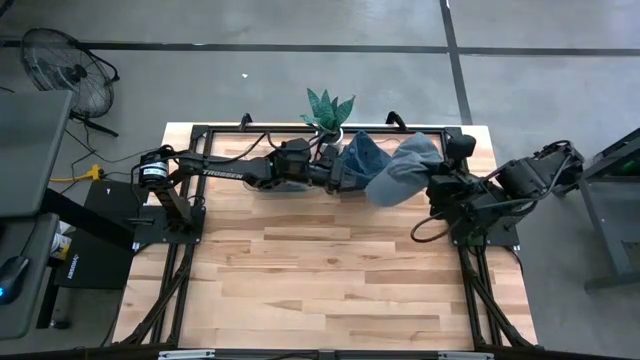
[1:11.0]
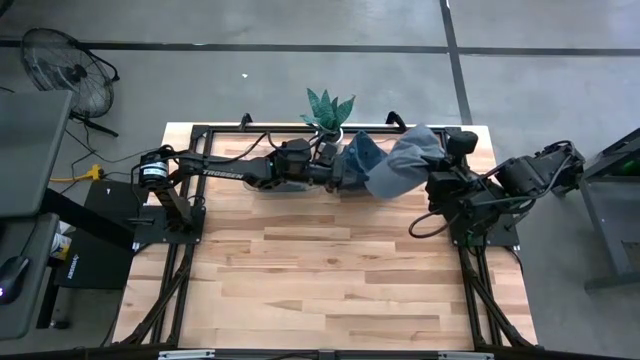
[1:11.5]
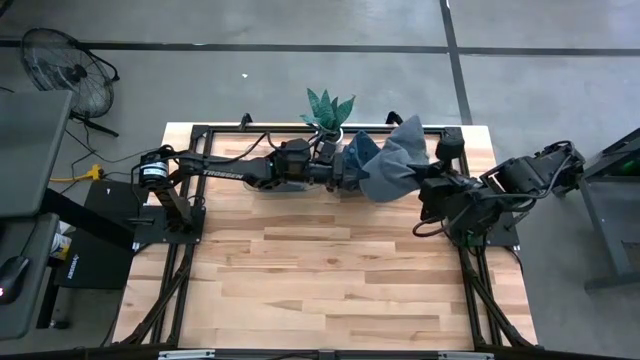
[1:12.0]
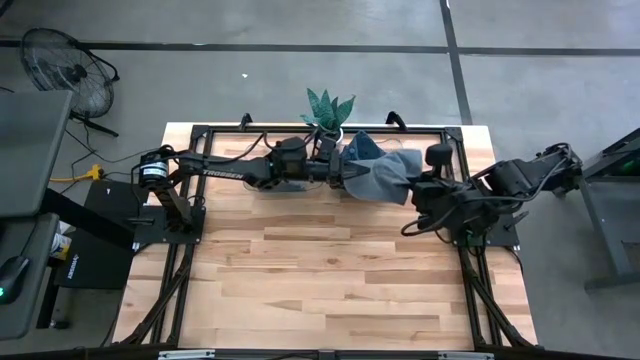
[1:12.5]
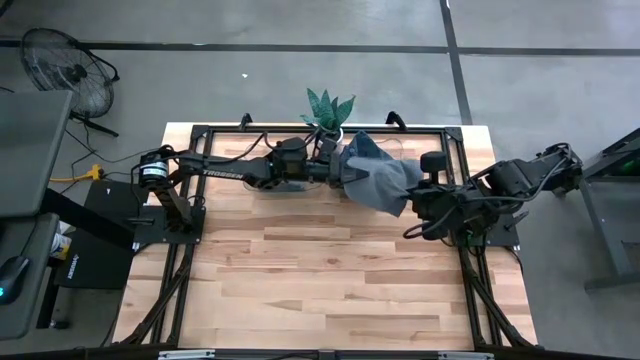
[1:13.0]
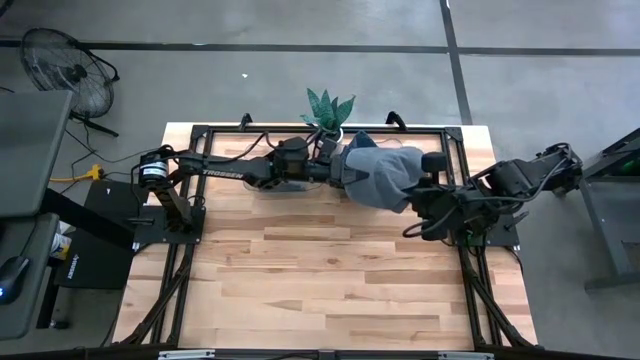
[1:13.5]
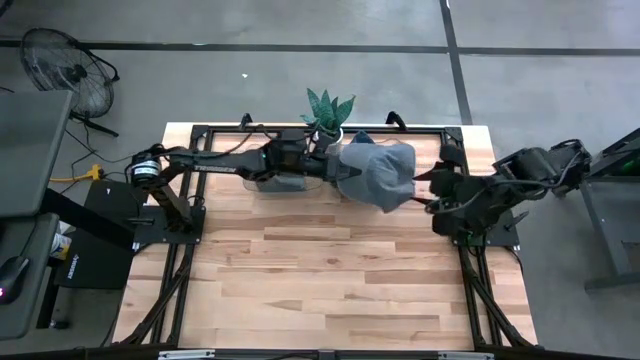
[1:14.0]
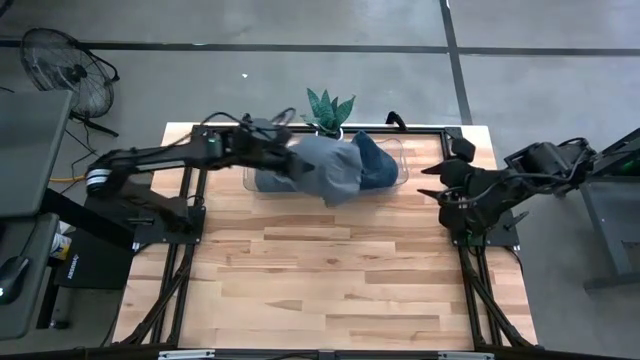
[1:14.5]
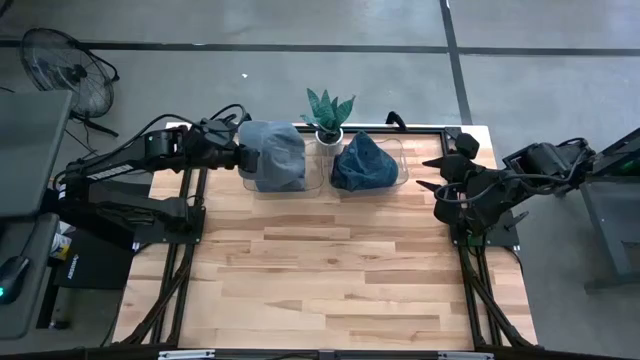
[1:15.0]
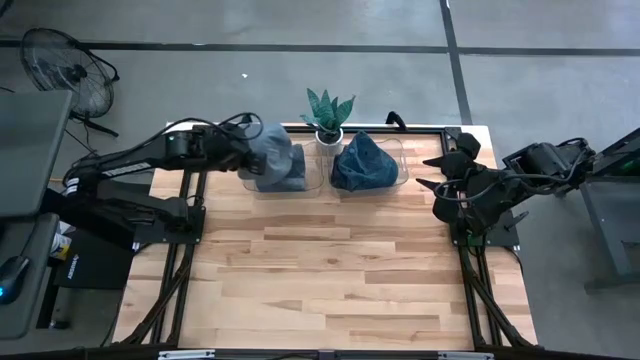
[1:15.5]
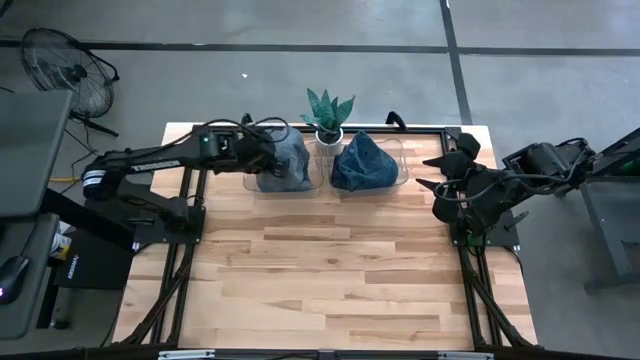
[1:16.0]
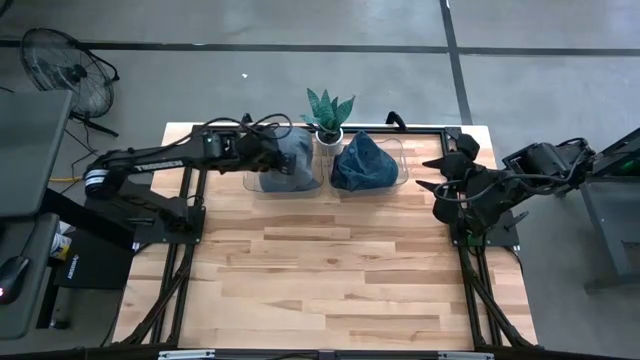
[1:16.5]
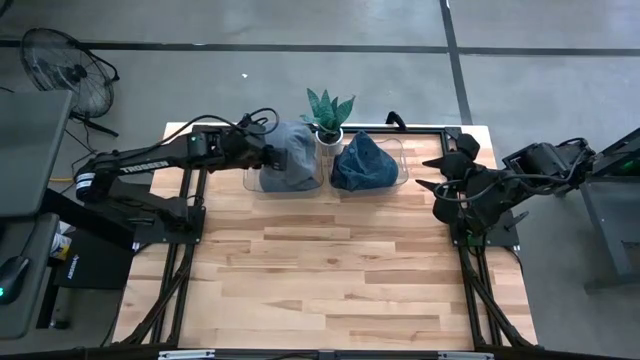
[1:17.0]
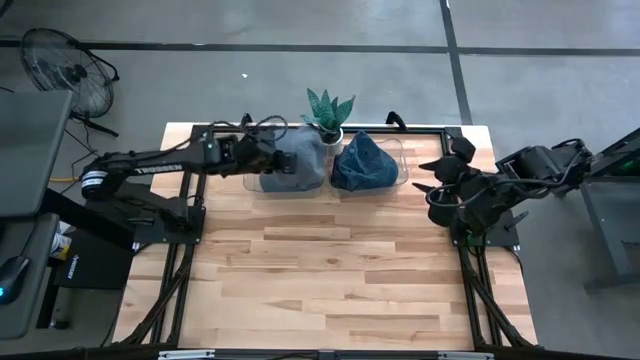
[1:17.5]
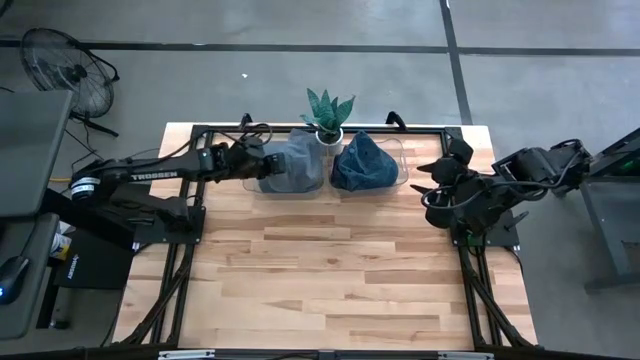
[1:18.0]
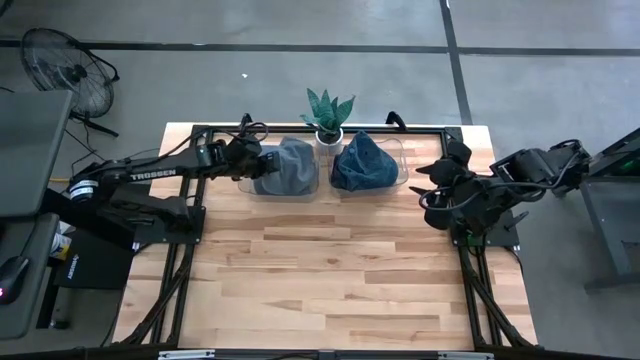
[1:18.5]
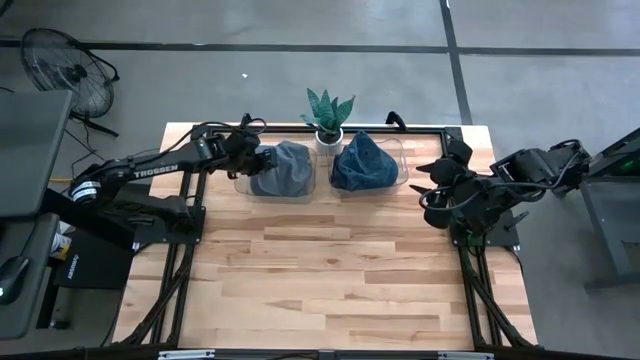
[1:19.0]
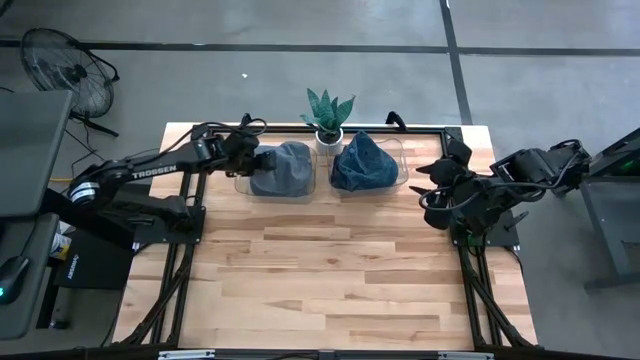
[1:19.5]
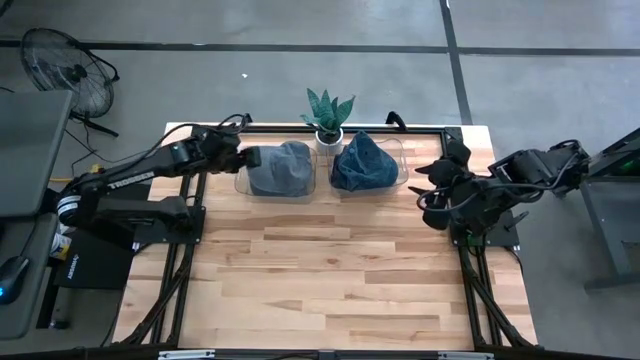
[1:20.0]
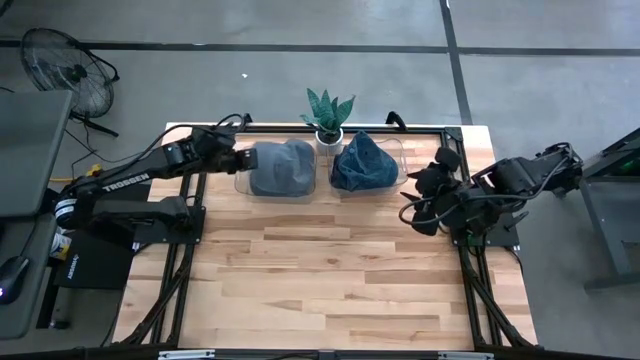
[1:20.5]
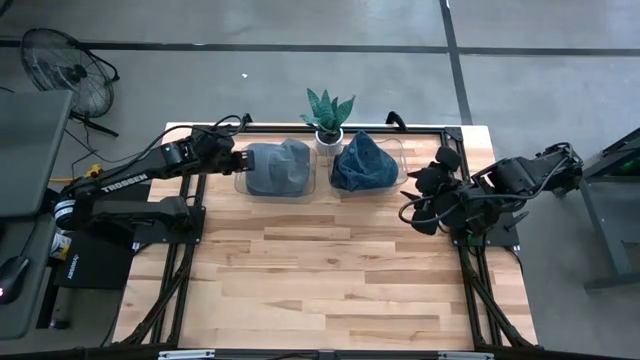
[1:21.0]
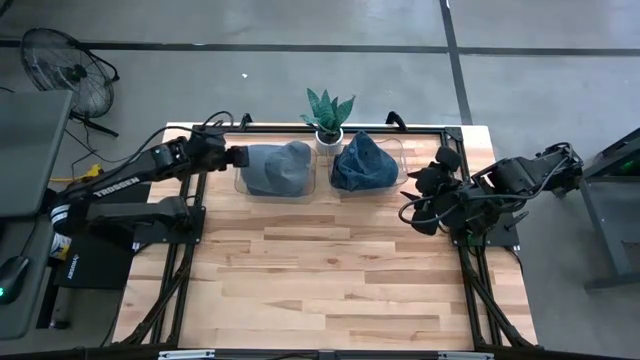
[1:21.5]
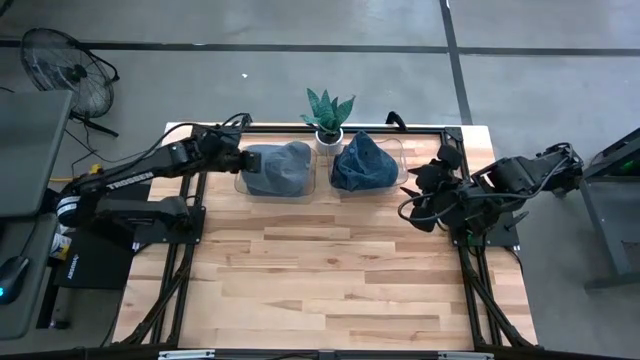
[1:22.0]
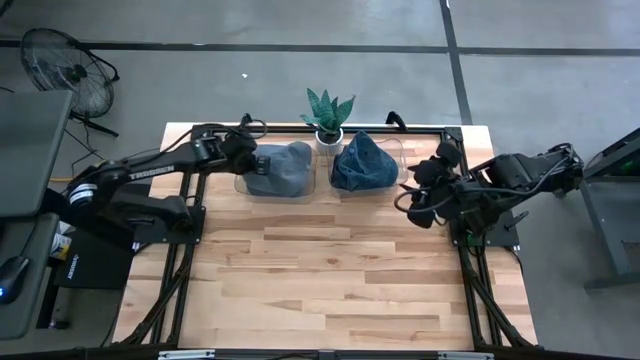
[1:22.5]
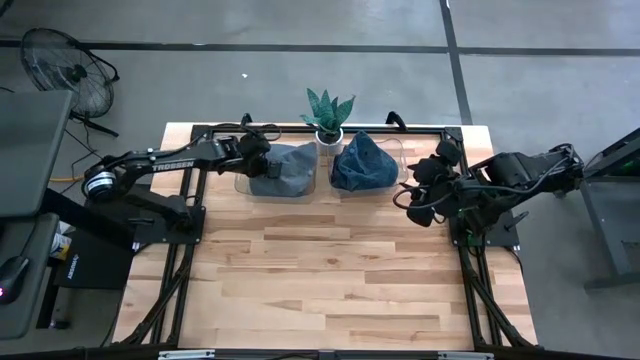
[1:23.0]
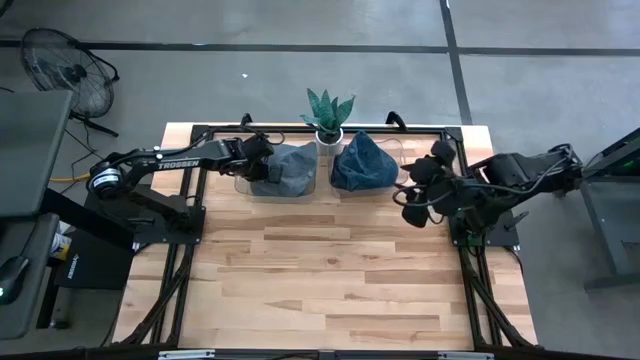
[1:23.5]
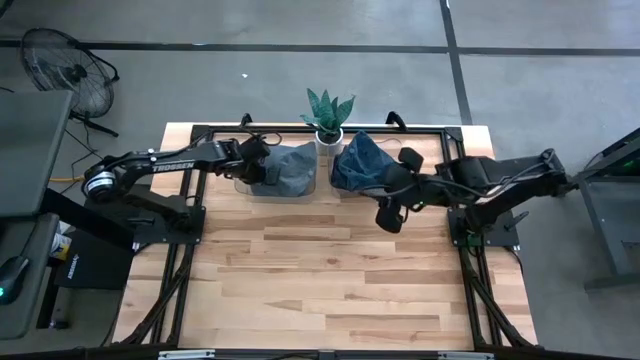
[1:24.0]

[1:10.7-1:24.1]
Task: Pick & Place hat
Put the gray cap into the left transparent bin

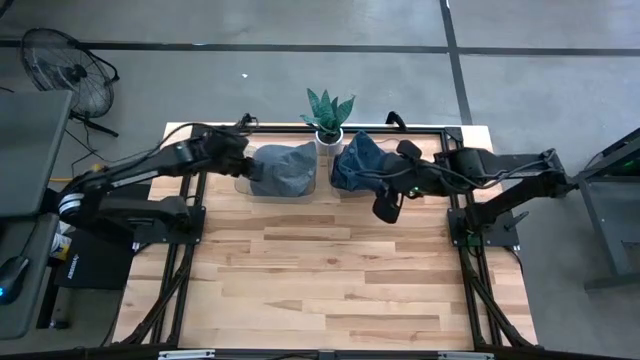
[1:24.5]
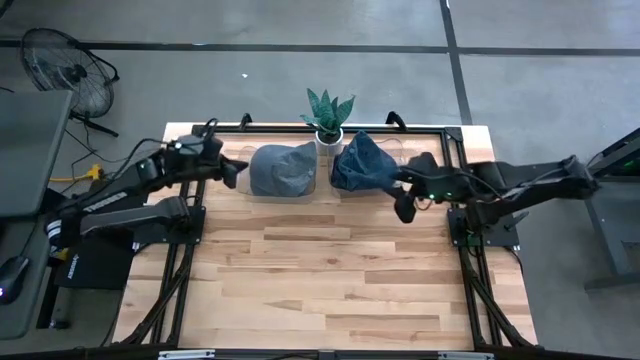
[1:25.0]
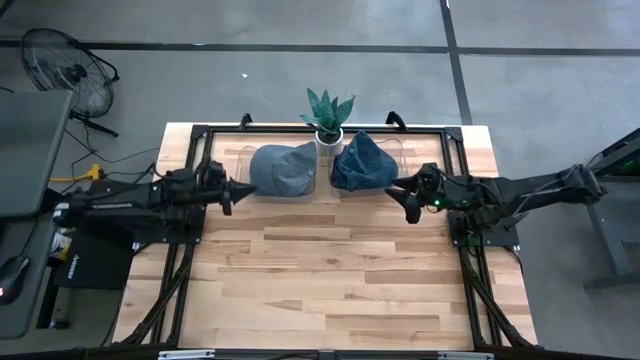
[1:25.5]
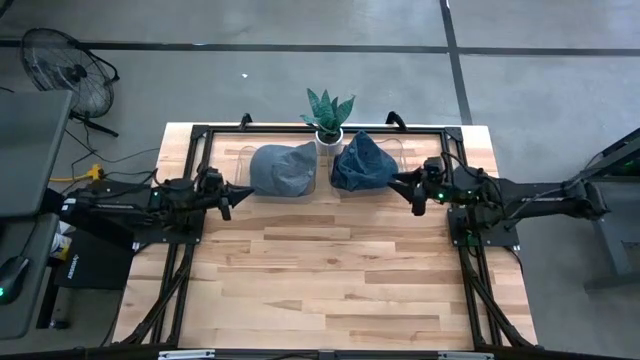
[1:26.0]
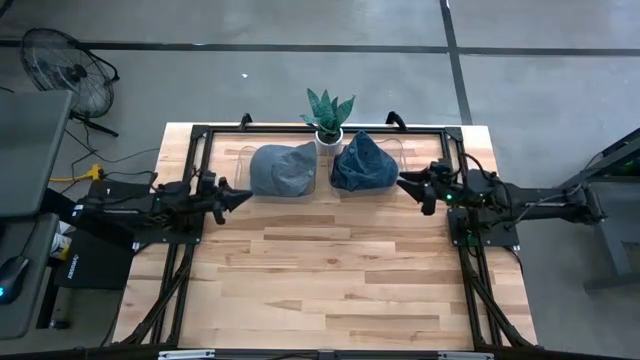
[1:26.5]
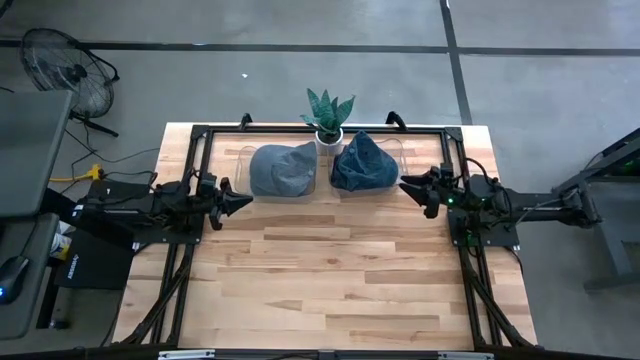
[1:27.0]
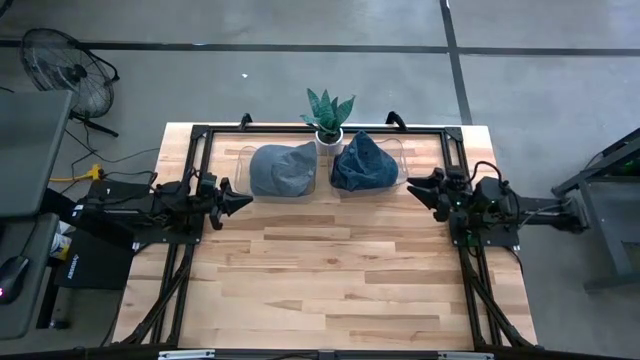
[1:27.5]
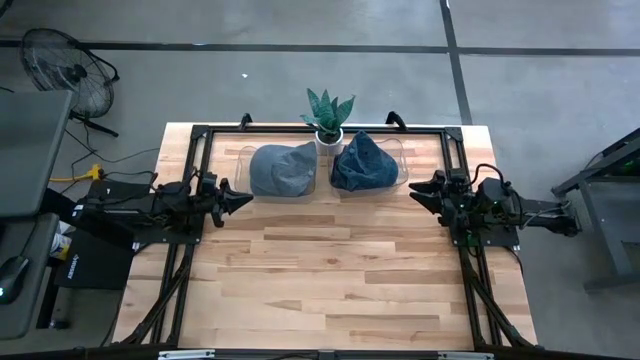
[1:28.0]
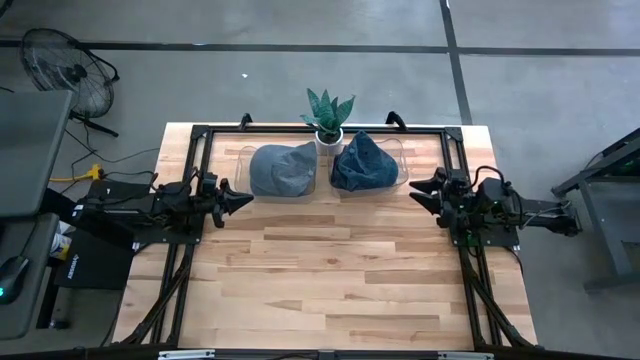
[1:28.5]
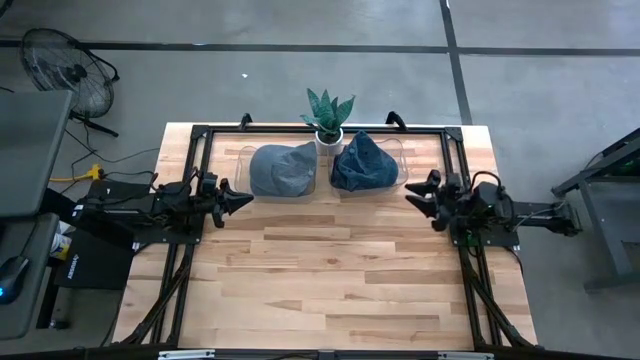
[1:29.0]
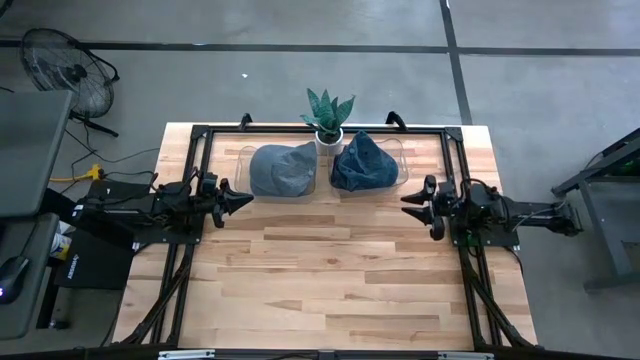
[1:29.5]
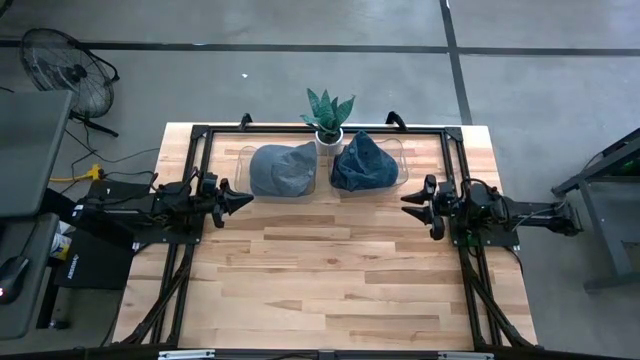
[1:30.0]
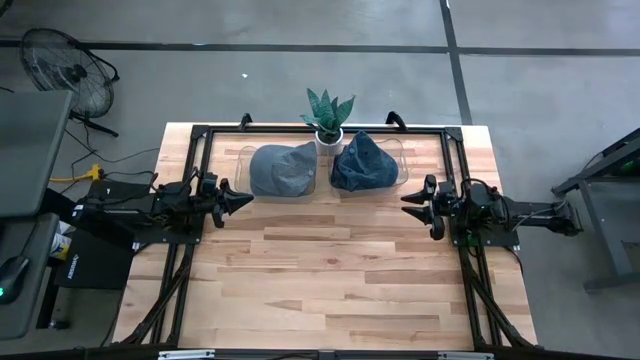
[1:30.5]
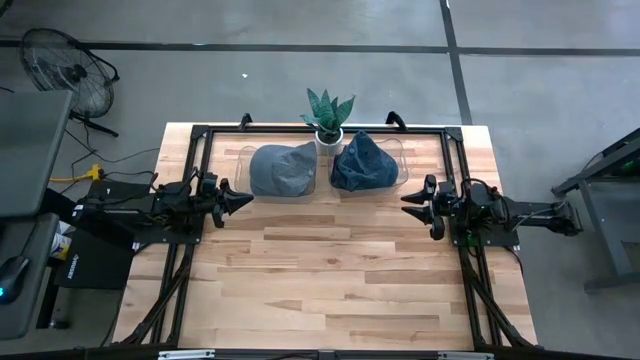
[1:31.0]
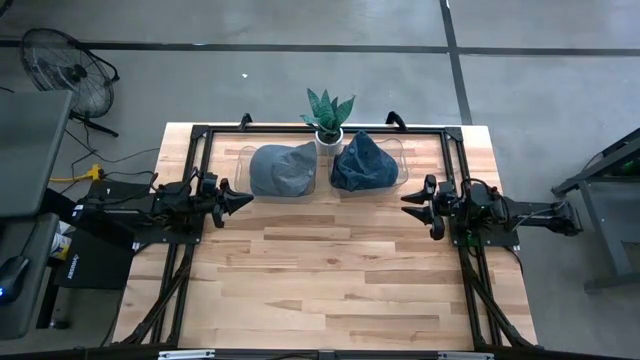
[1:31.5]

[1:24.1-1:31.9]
Return to Home Position
